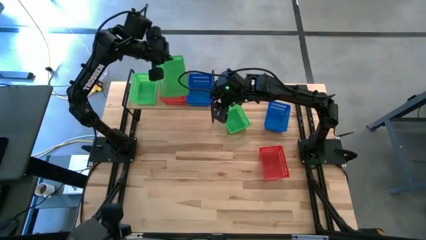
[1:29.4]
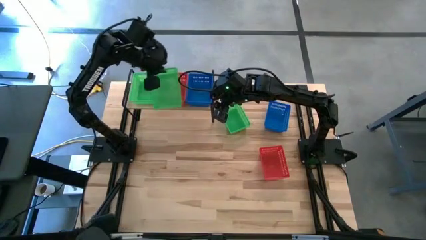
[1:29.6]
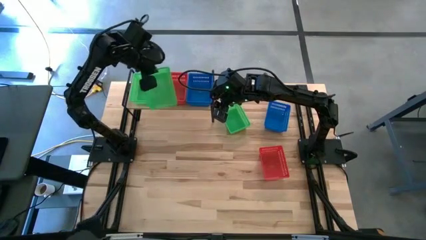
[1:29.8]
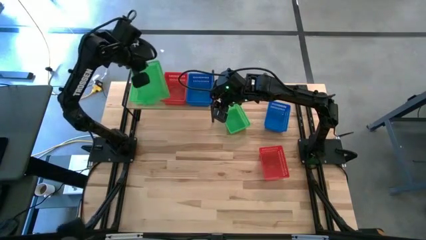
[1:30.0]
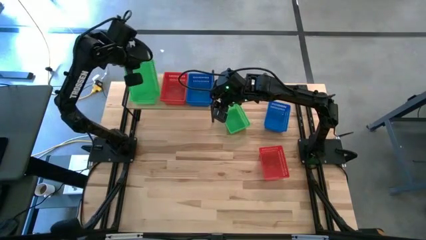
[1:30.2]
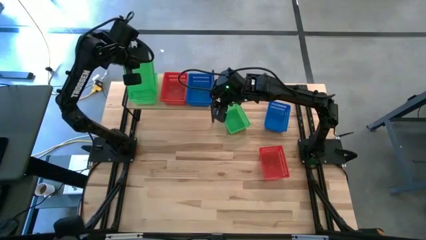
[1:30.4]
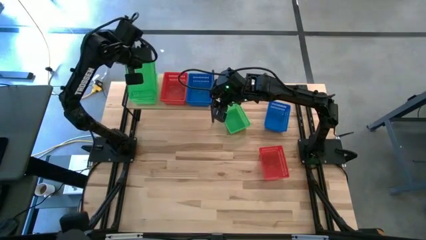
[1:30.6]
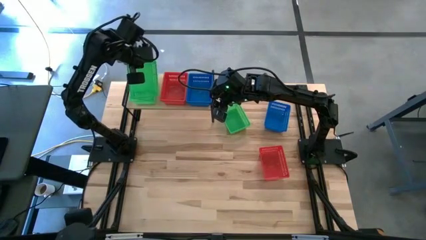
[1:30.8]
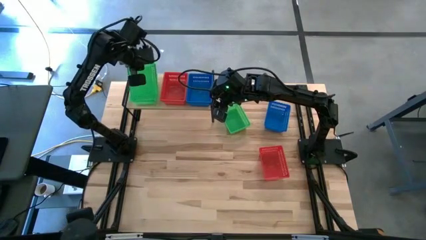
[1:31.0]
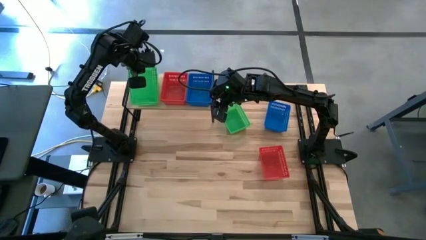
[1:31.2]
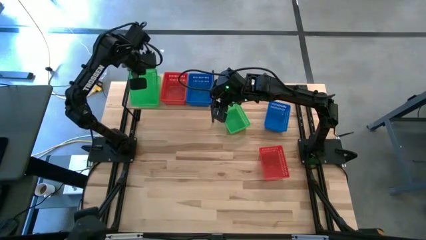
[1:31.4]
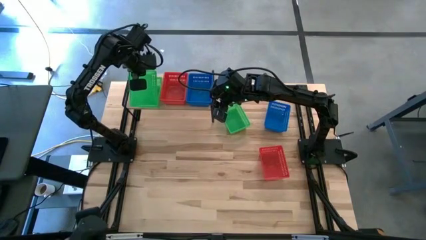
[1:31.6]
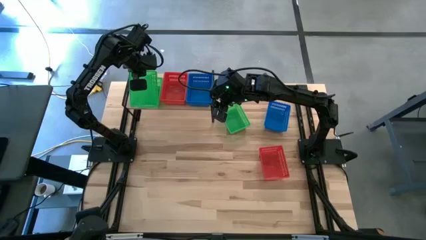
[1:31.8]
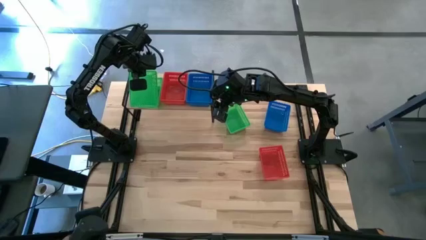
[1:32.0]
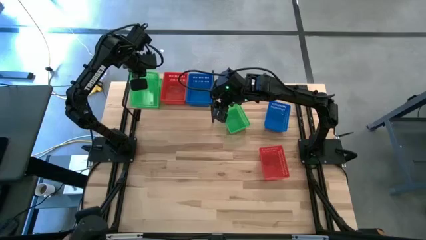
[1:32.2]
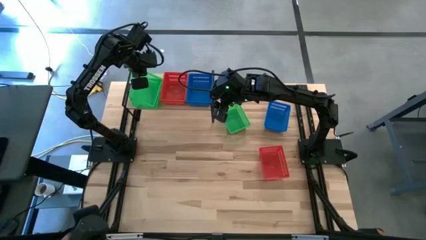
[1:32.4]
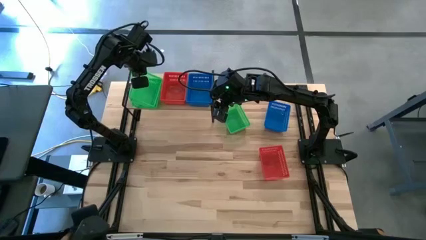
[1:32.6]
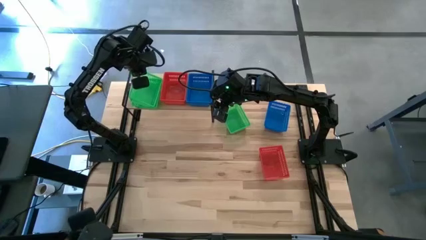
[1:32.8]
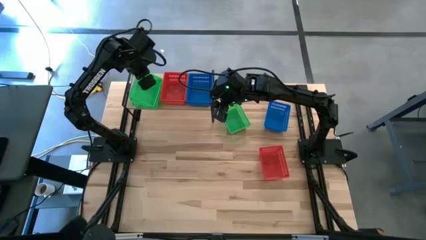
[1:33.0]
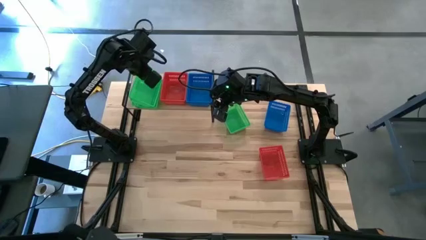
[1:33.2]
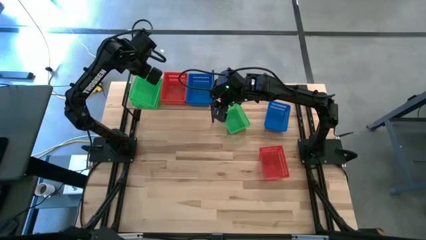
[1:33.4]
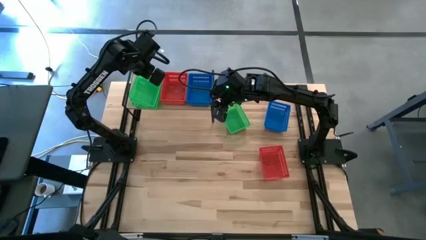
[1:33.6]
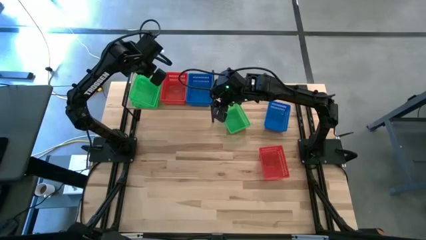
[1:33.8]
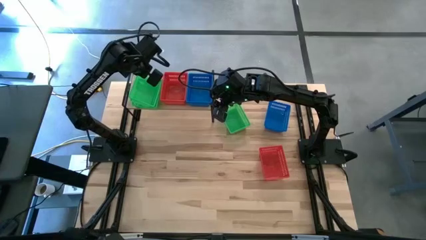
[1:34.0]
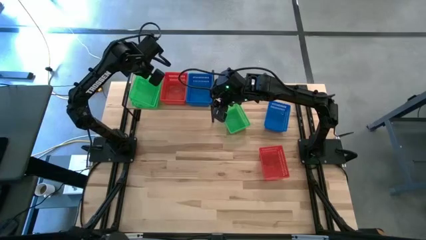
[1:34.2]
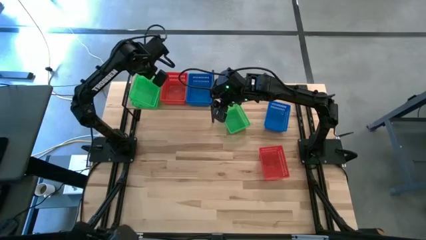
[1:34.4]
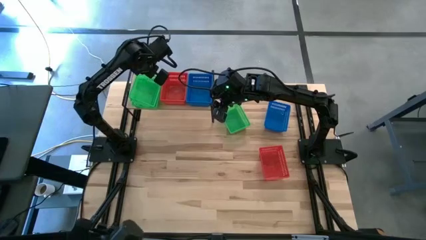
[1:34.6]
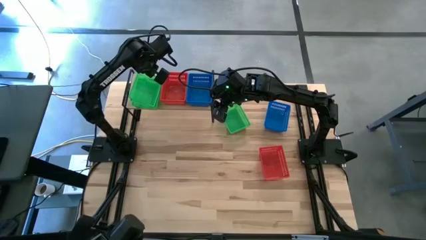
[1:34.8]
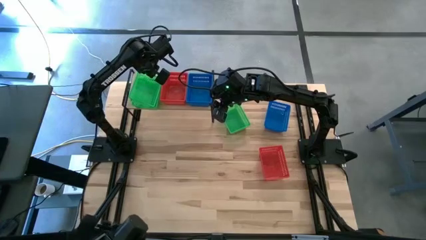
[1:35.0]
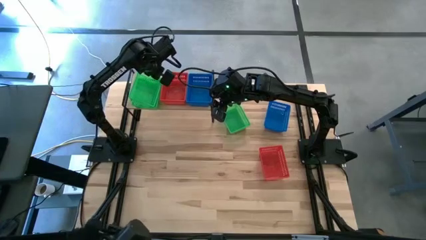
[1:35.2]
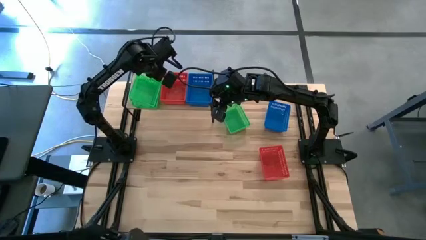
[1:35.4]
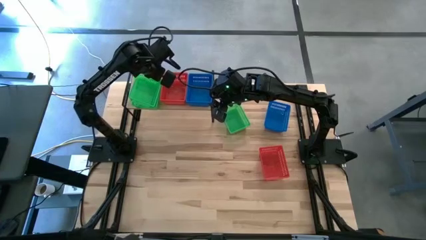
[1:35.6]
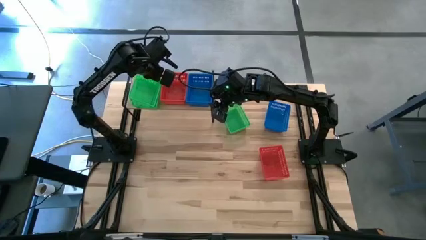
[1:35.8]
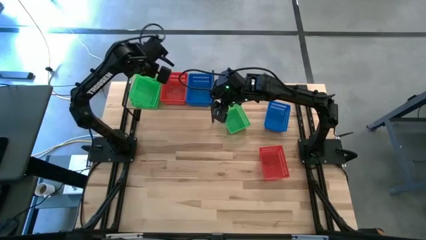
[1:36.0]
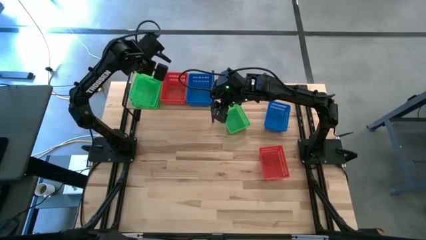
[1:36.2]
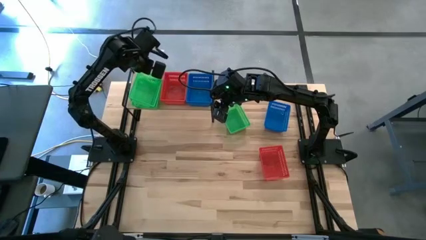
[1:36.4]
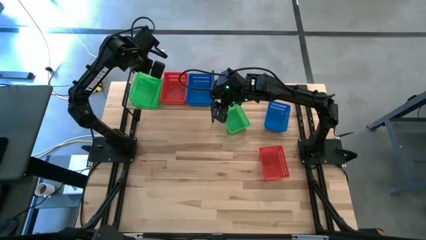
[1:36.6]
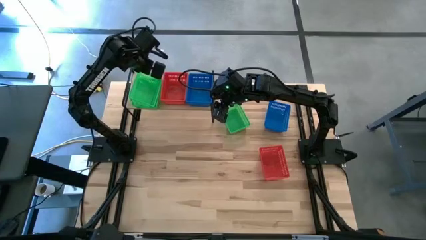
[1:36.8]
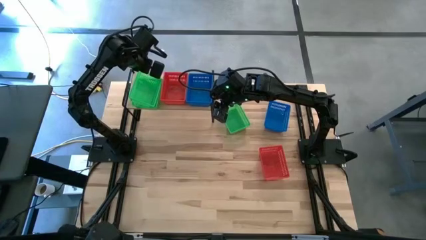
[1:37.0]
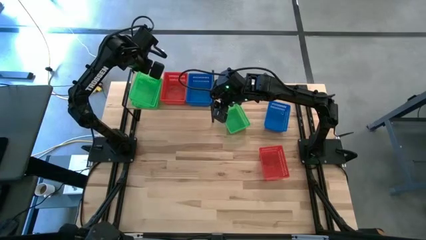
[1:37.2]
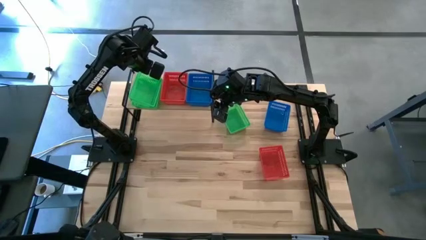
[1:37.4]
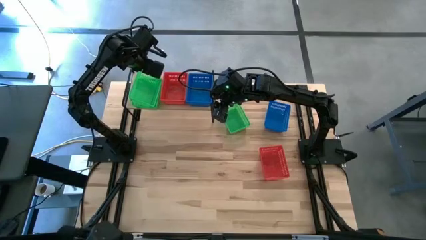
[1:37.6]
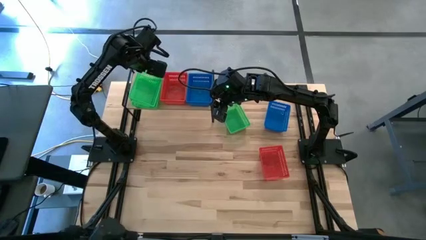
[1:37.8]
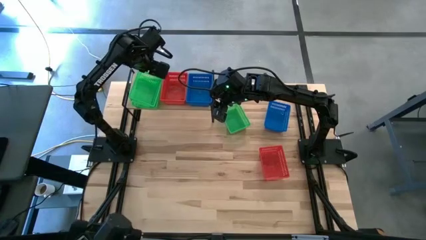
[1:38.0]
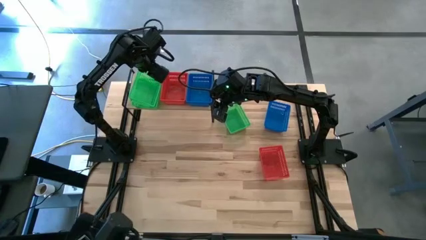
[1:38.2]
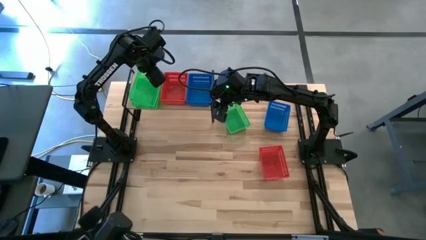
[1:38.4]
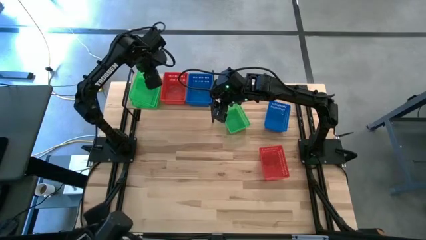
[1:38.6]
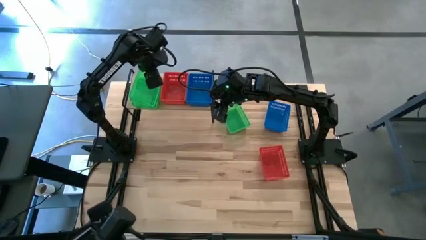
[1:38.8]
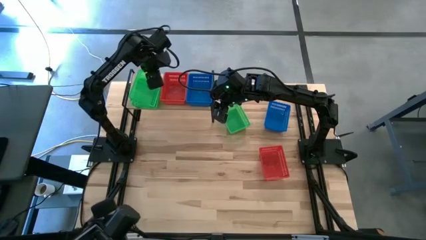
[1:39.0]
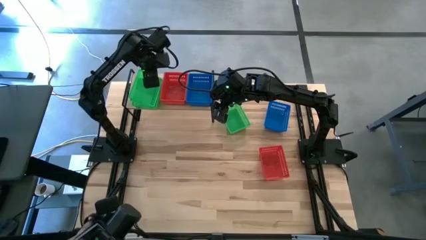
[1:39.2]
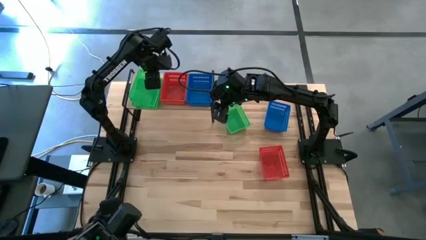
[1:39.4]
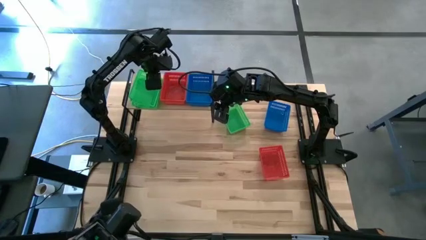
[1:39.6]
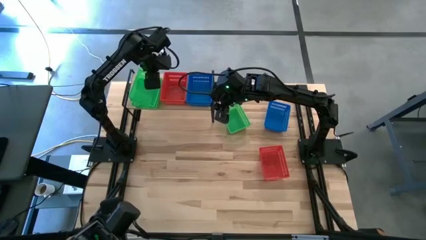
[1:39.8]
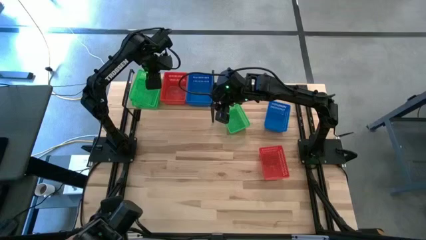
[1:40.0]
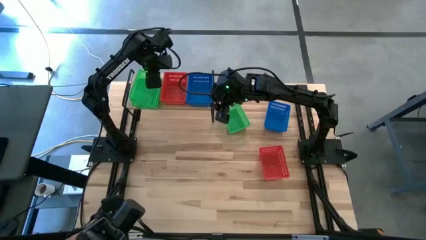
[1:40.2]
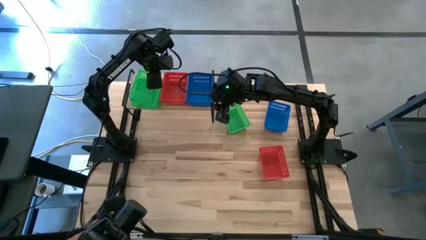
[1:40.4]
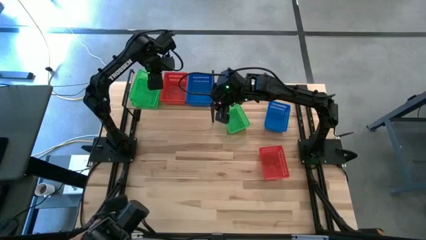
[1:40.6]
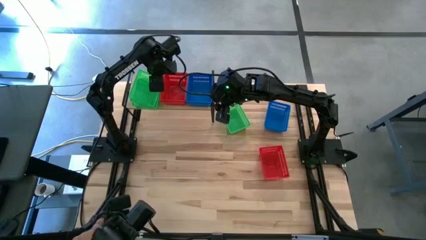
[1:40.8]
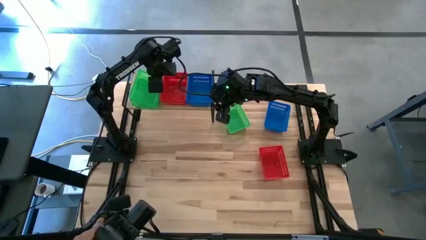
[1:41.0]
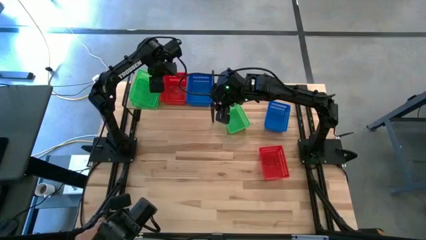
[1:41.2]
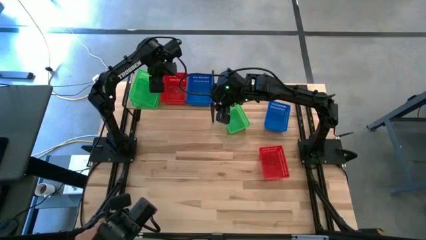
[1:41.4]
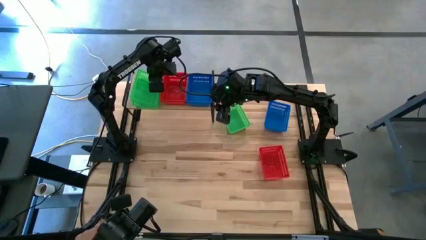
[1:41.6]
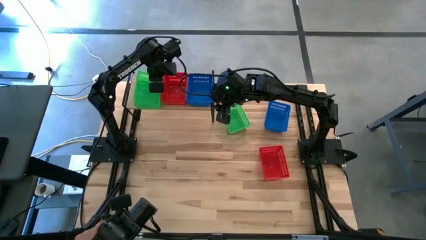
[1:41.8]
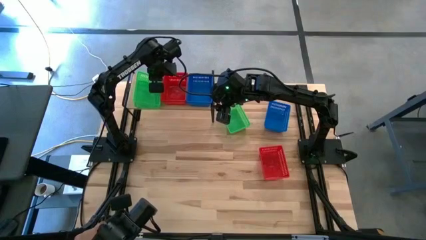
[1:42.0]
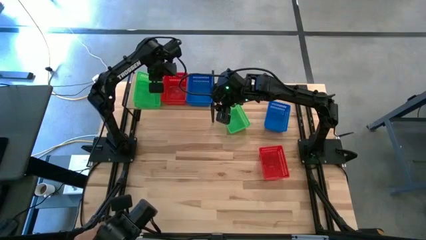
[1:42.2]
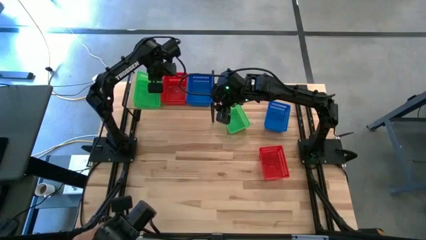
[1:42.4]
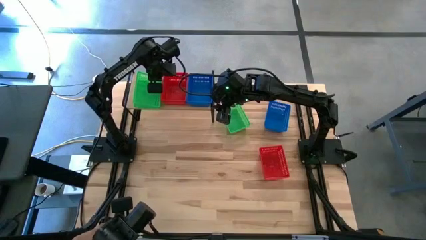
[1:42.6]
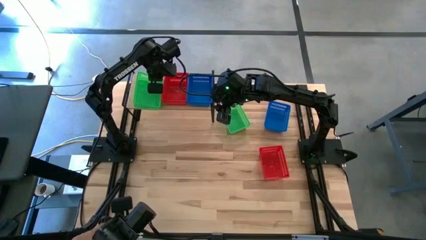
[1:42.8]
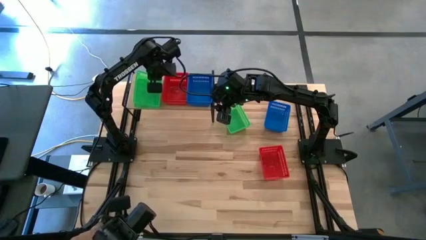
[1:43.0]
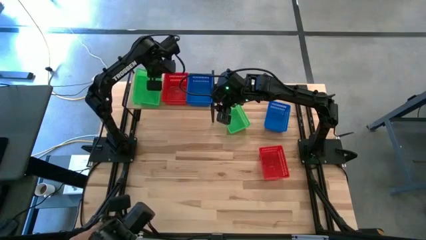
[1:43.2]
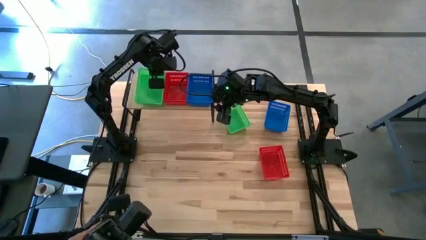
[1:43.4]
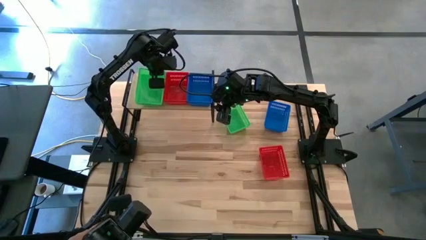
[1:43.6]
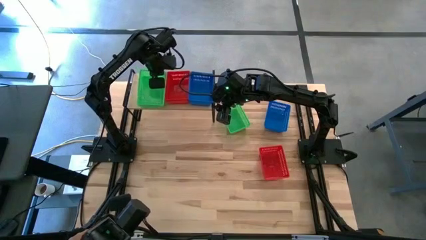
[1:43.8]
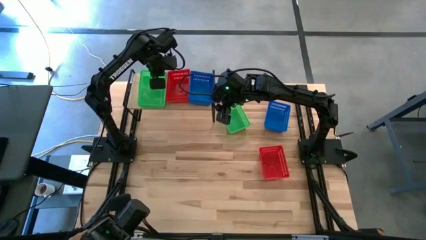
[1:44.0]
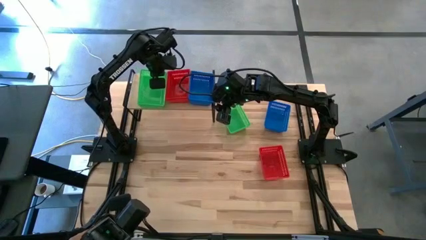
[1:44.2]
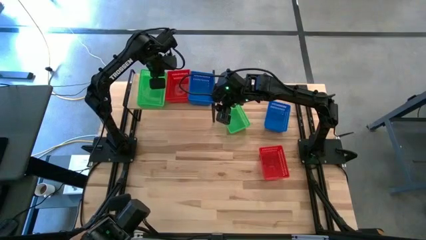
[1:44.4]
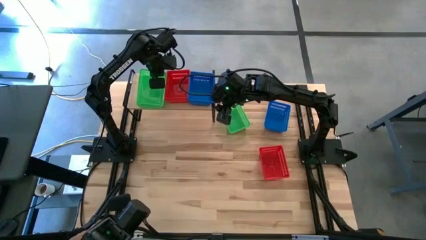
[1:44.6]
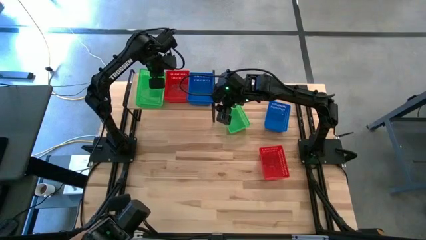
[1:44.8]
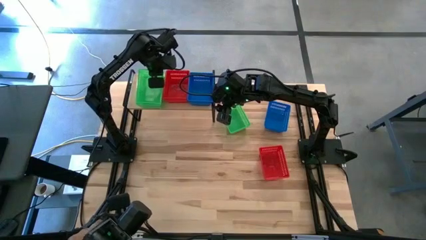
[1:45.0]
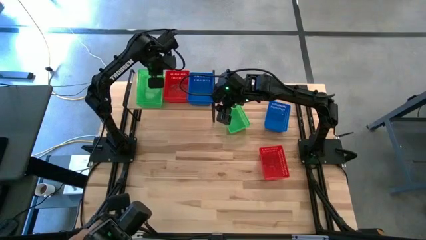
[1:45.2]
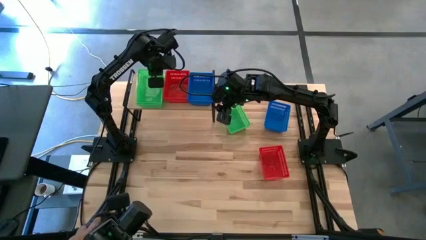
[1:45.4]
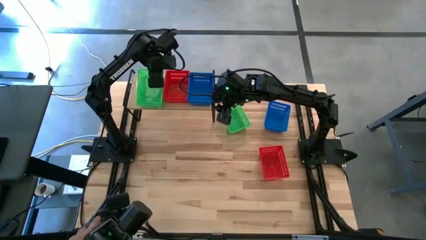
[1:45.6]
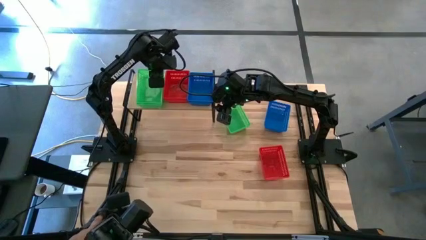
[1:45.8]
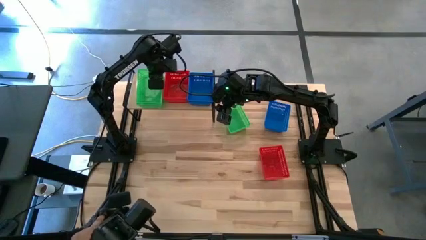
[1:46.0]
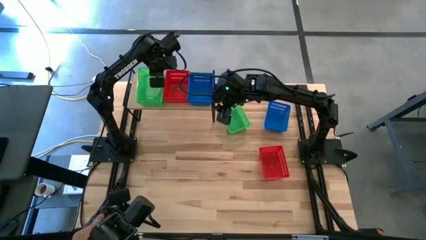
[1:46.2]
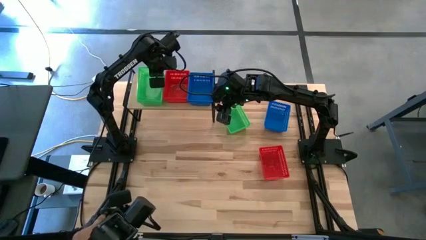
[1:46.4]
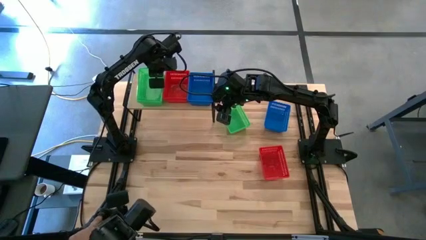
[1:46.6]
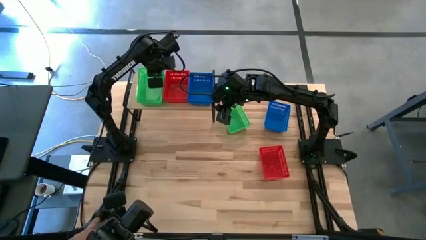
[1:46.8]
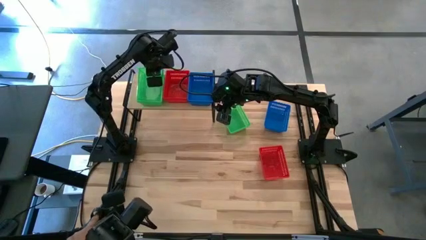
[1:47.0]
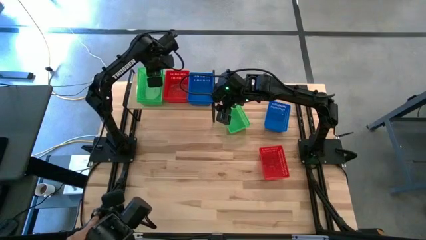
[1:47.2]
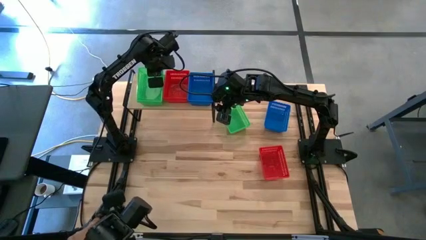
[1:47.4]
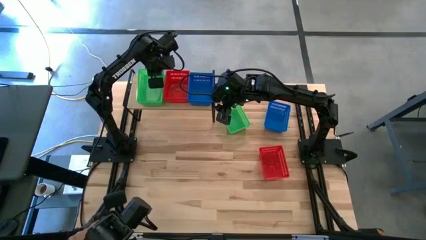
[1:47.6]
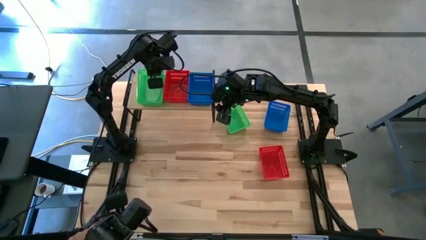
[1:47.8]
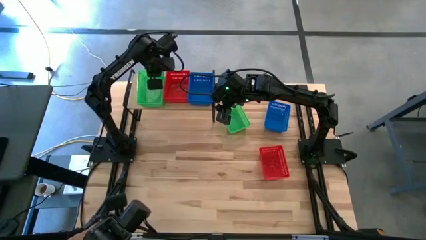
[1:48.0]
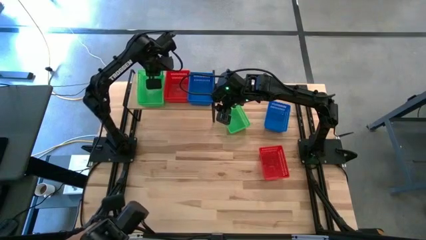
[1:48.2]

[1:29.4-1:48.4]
Task: Stack baskets on shelf by color
Stack the bottom green basket on top of the green basket on the shelf
